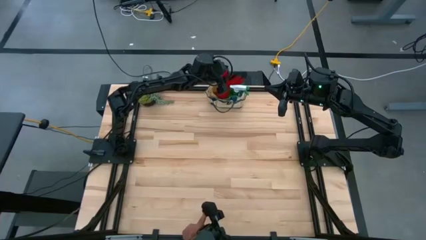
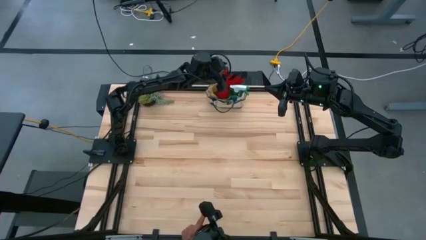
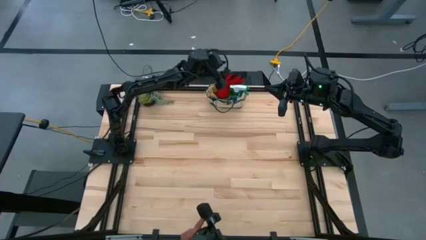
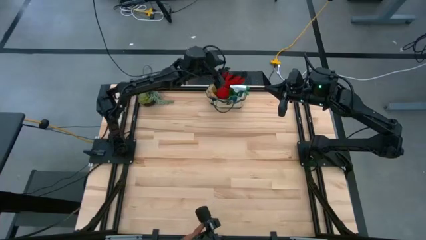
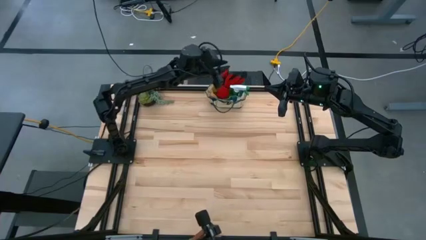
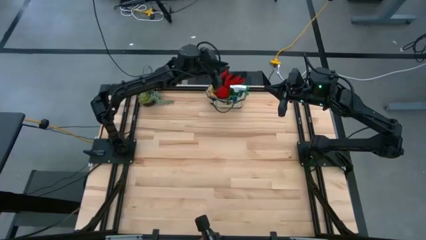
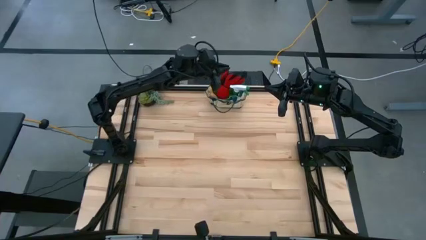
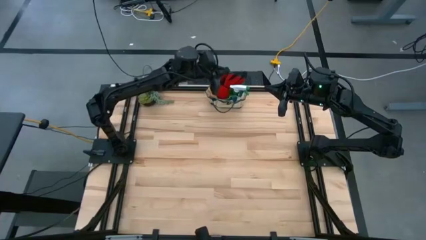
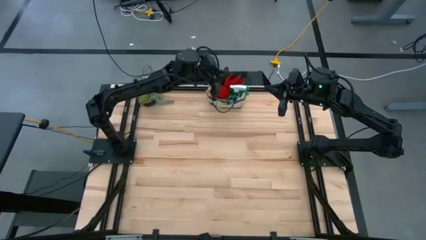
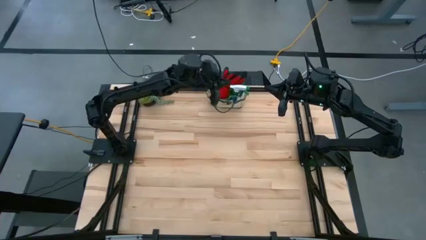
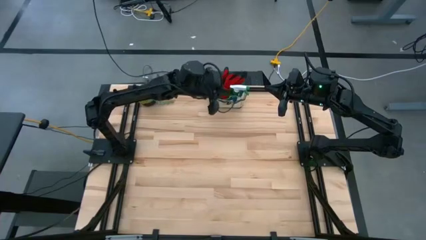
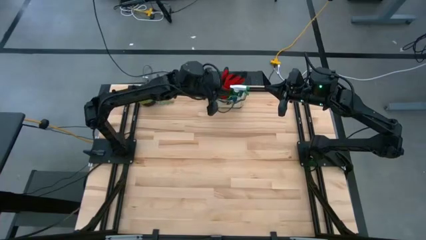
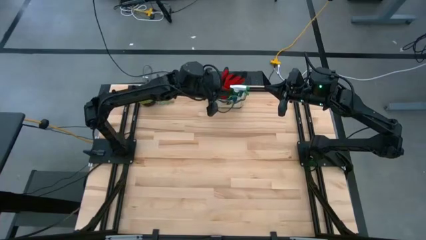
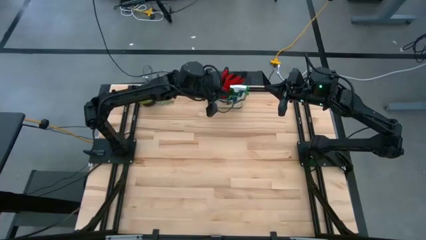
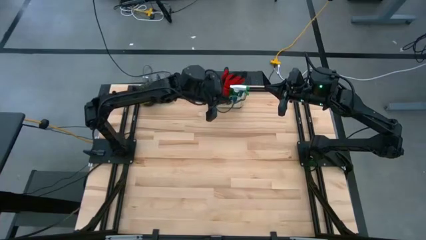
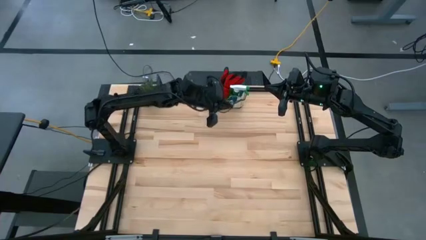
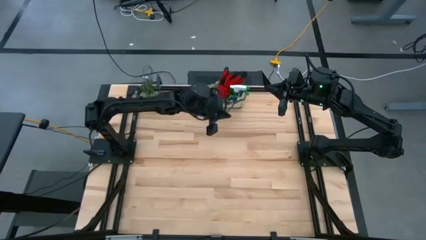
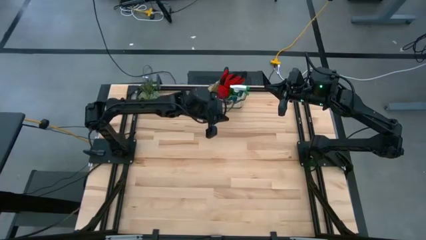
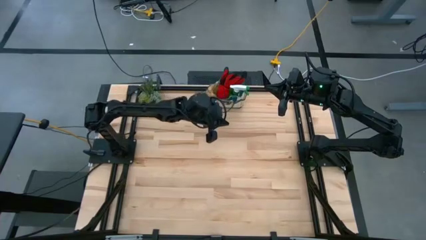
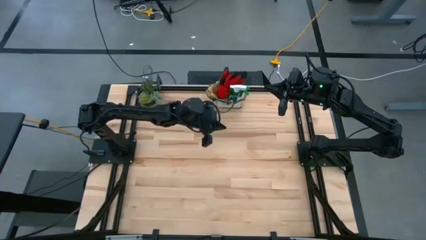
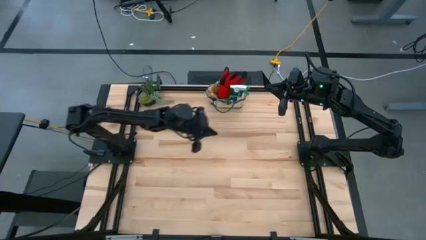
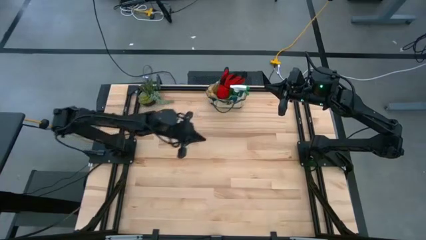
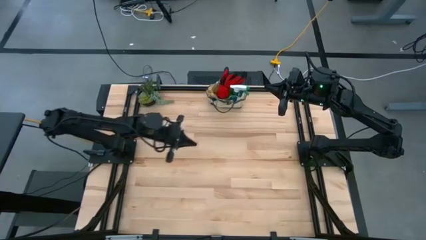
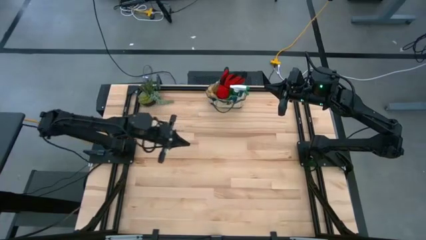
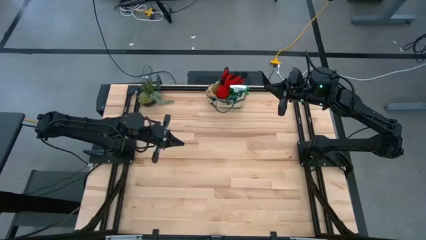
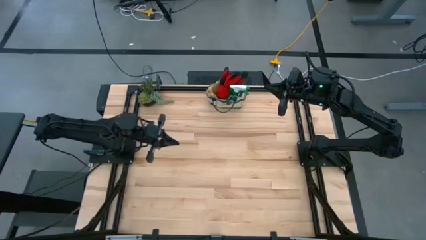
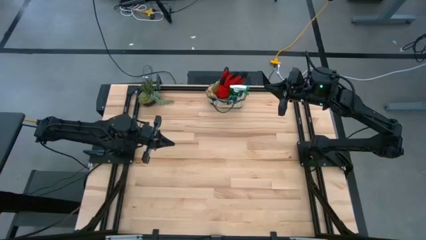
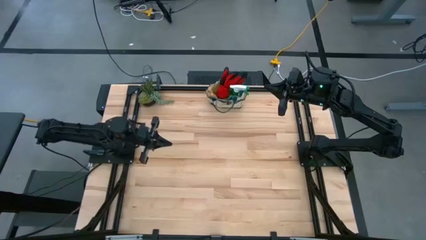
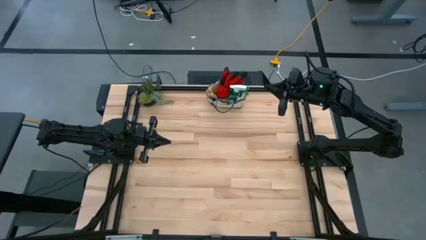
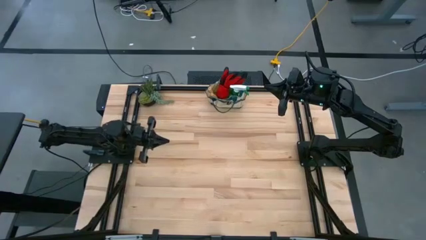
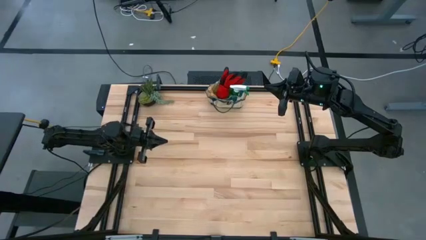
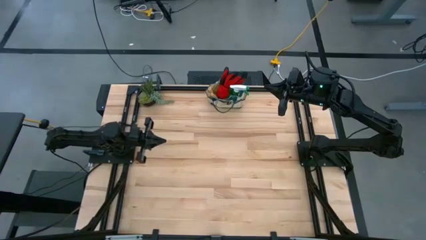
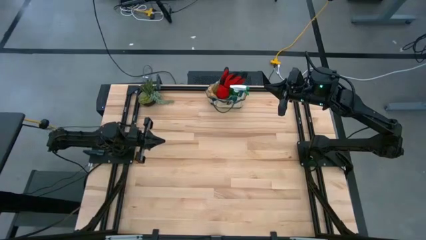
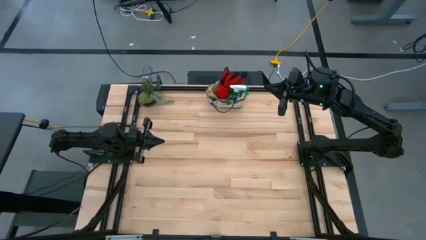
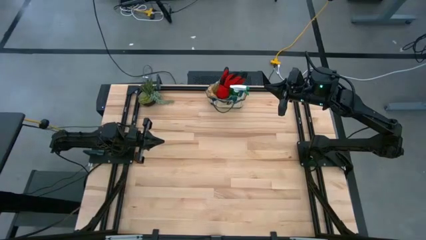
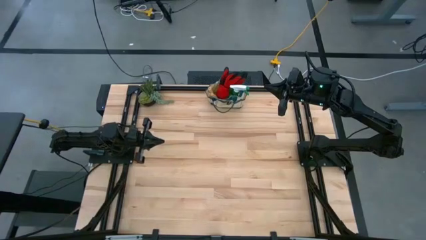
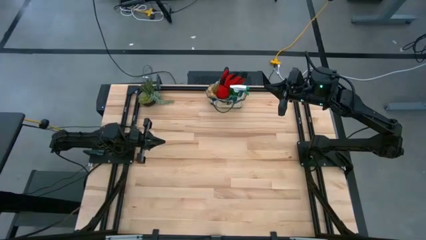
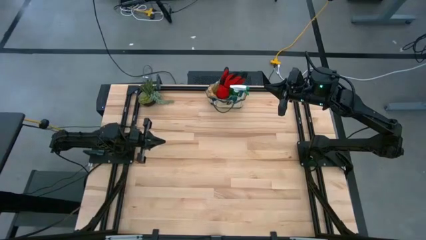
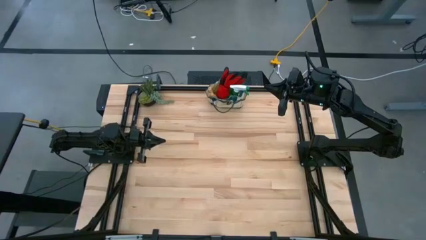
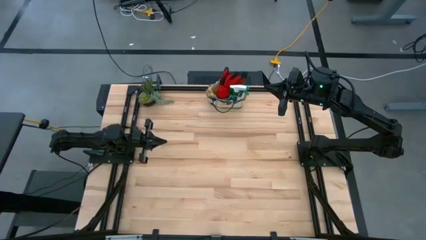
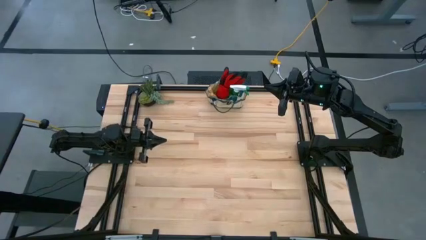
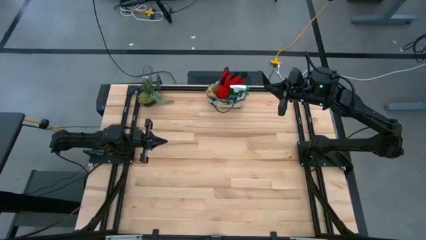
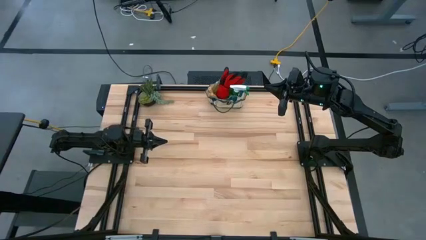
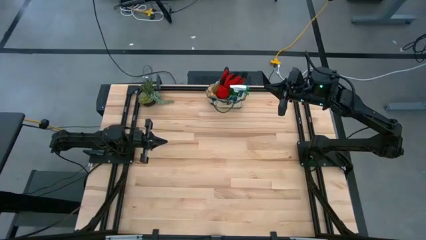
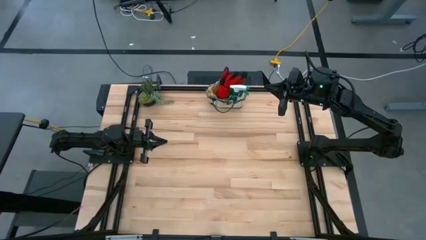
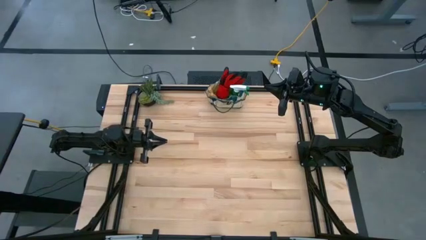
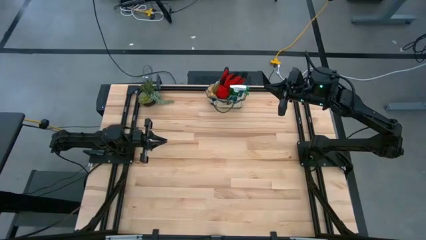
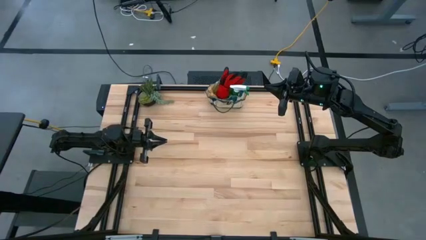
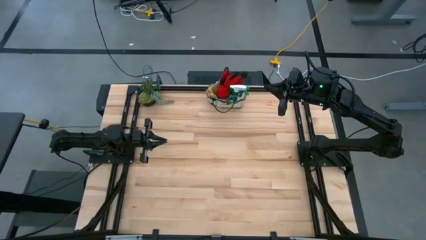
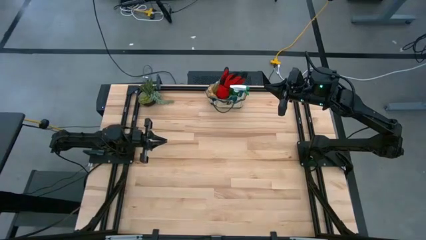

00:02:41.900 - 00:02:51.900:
Task: Pick & Place Garden tools in Gardening bag
Return to Home Position

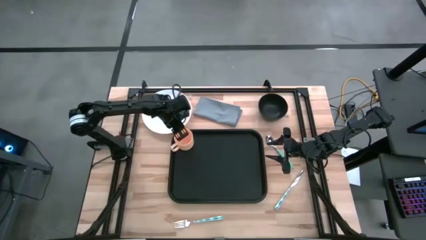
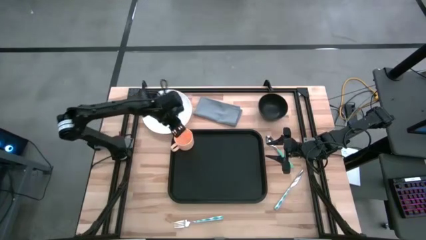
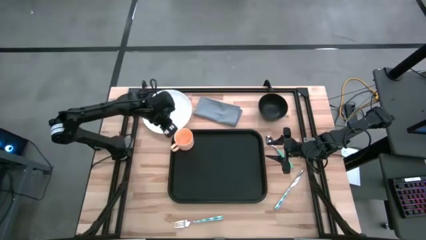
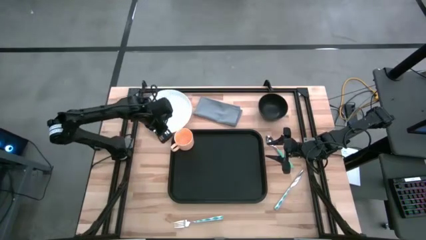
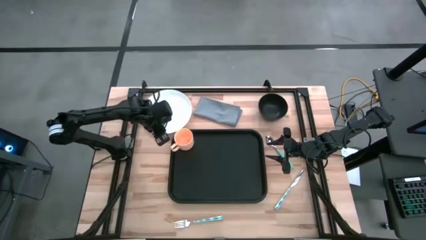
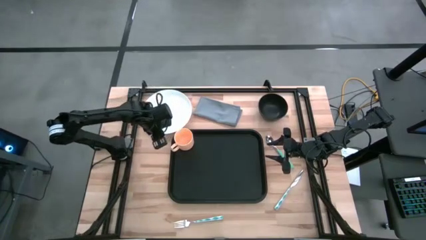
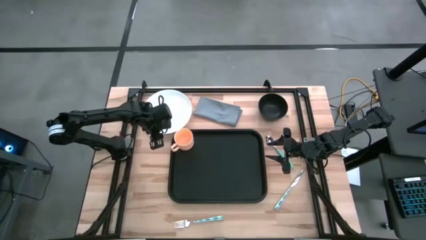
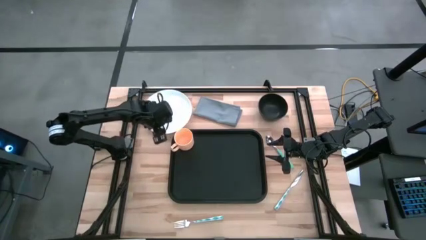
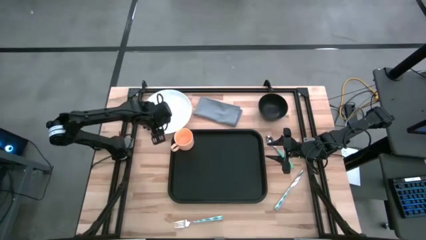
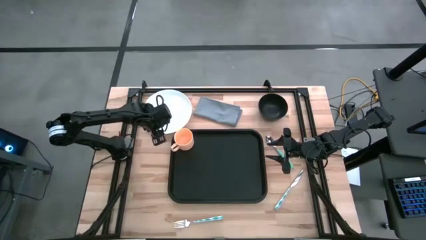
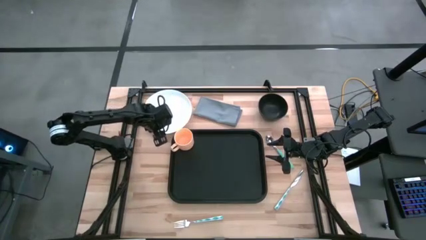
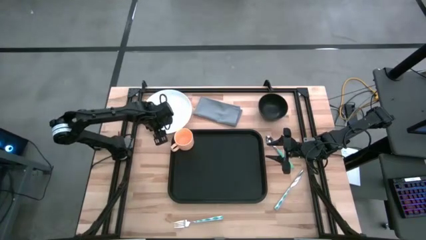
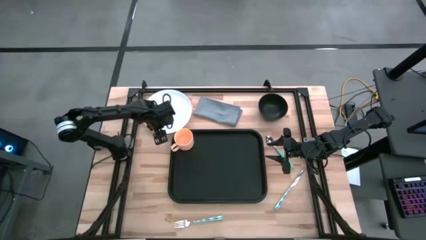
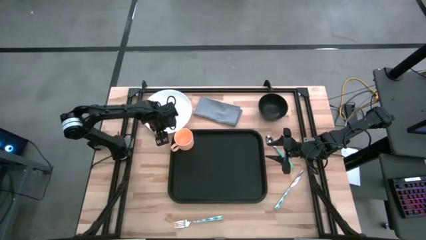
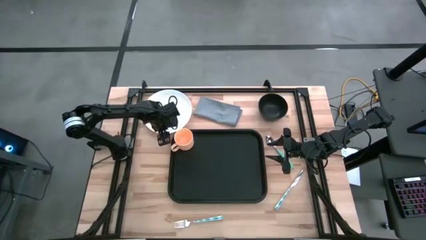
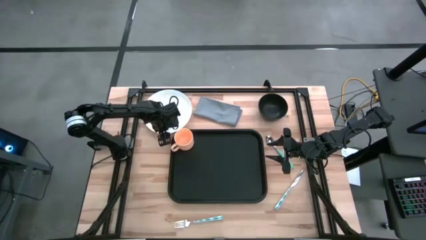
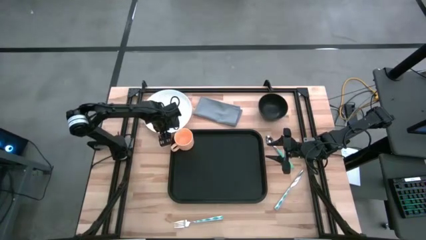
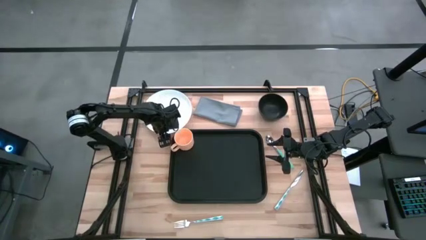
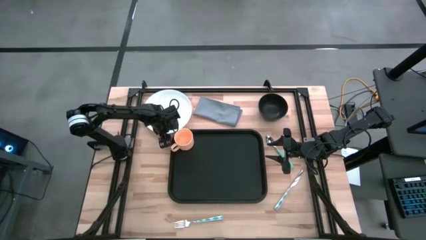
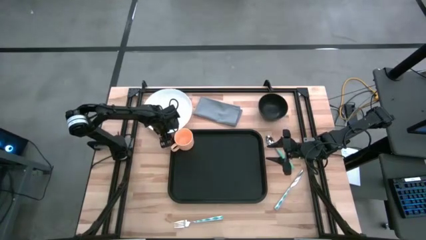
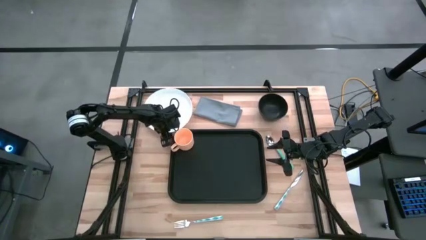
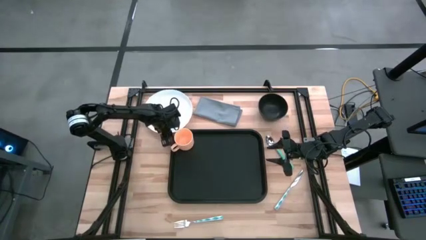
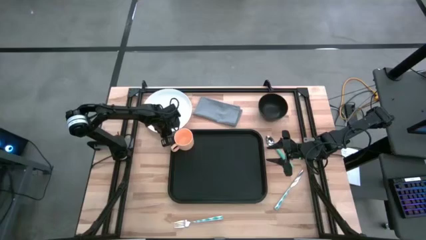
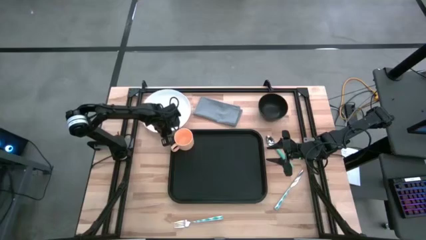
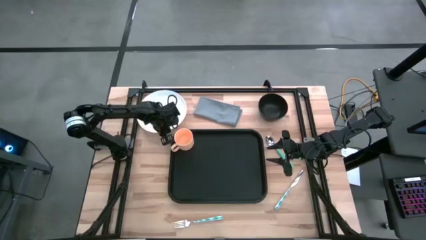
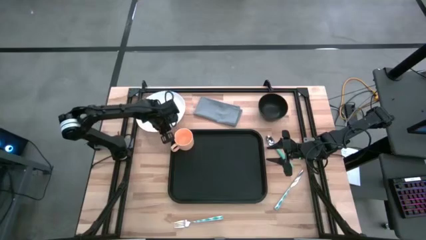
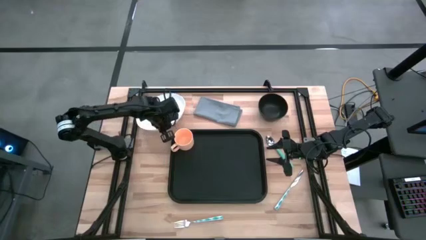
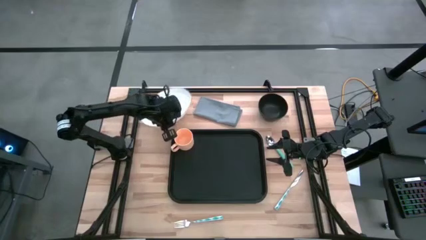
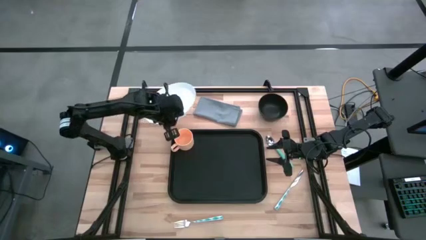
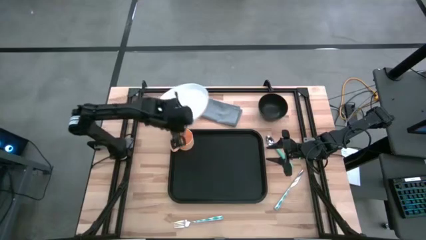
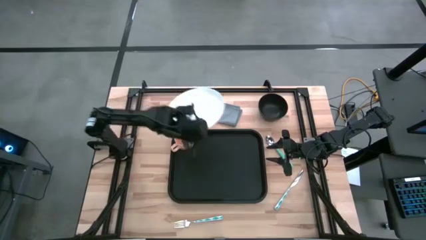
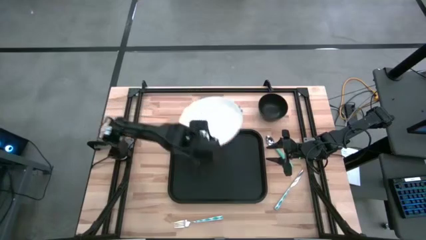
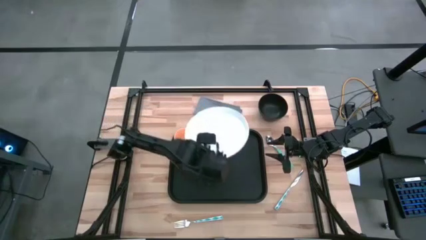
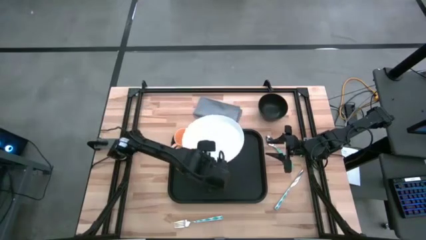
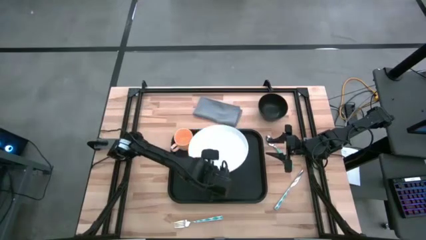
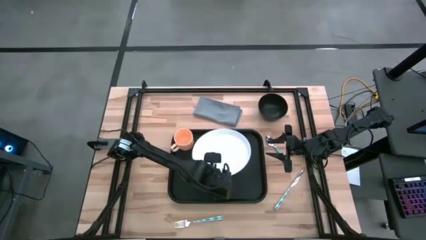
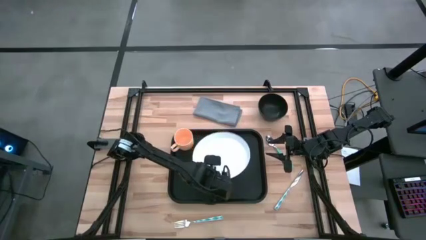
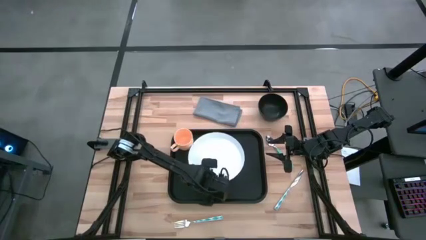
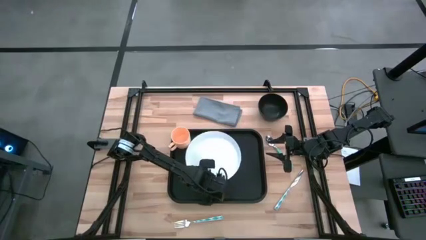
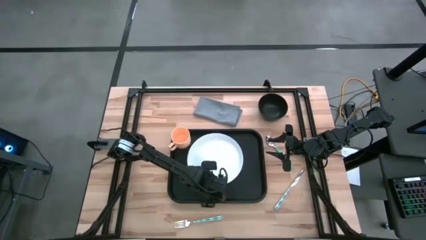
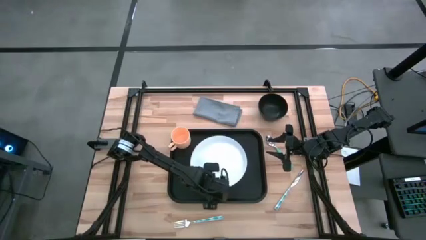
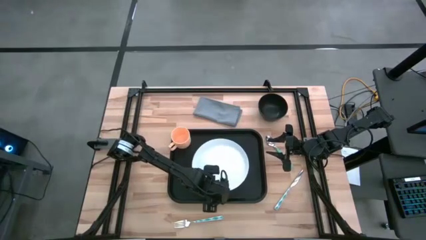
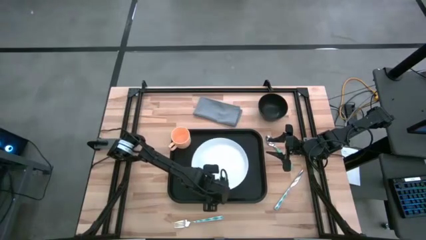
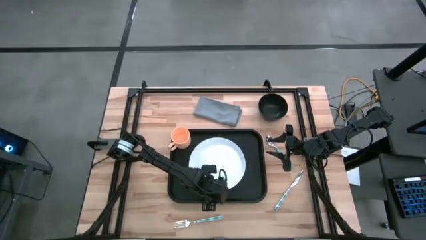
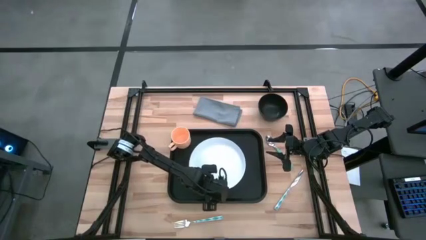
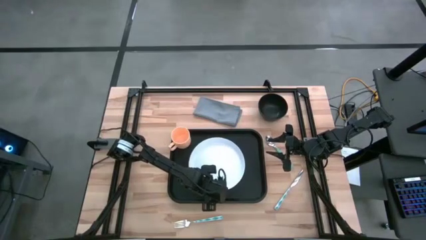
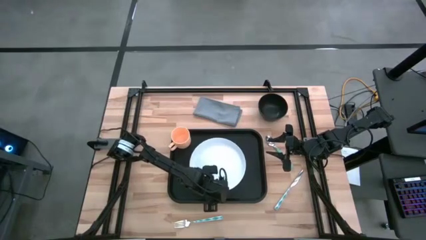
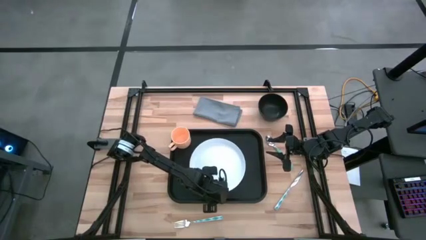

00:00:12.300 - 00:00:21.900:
Task: Set up tray
Put the white plate on the black serving tray to the bottom of the orange mug
